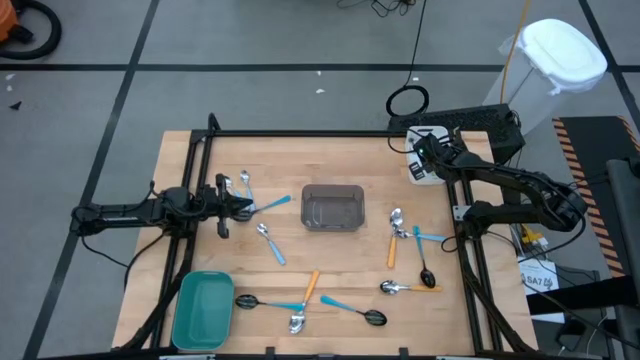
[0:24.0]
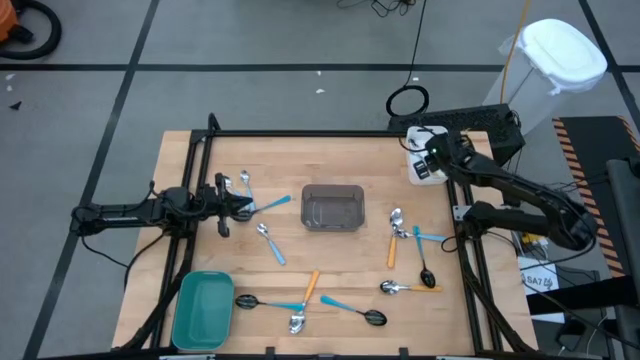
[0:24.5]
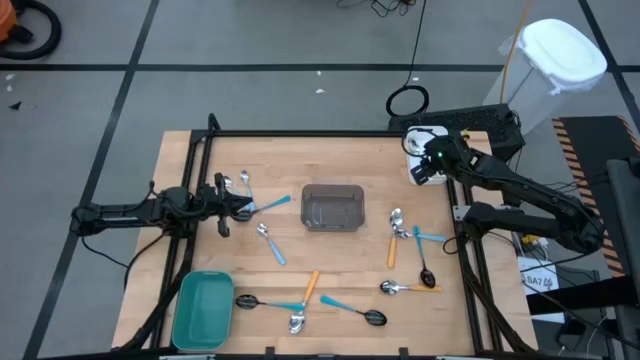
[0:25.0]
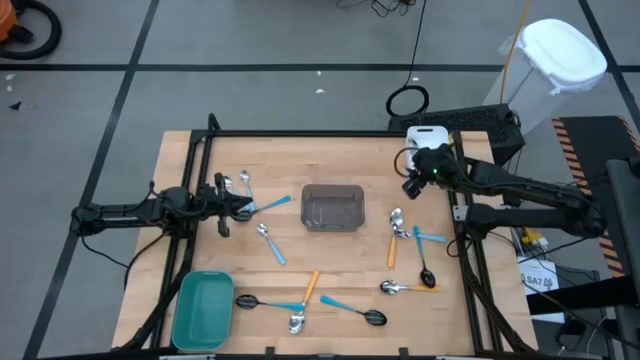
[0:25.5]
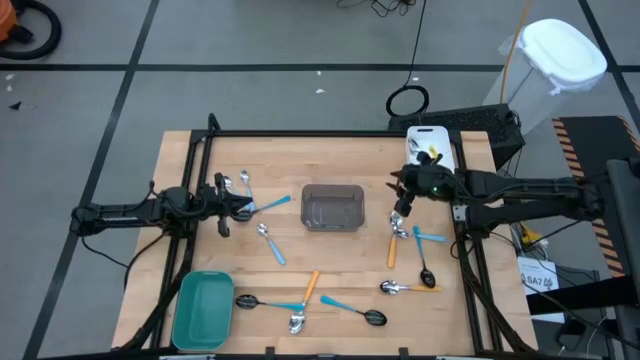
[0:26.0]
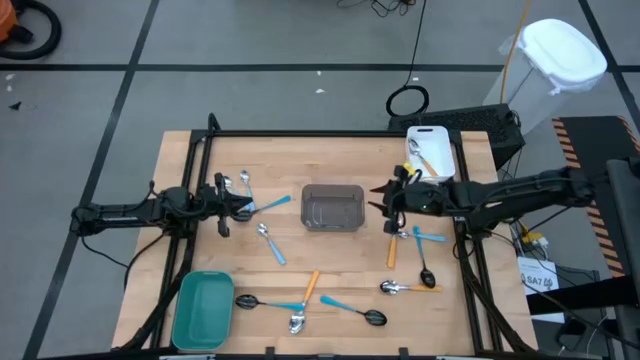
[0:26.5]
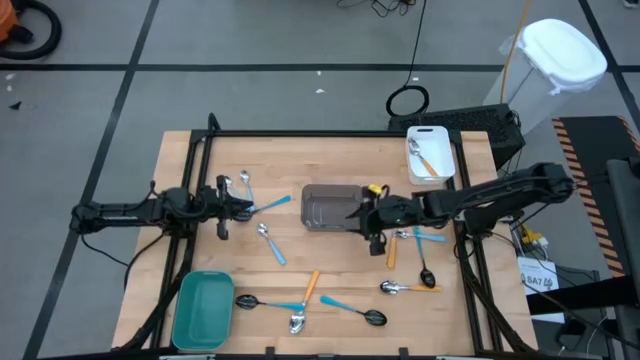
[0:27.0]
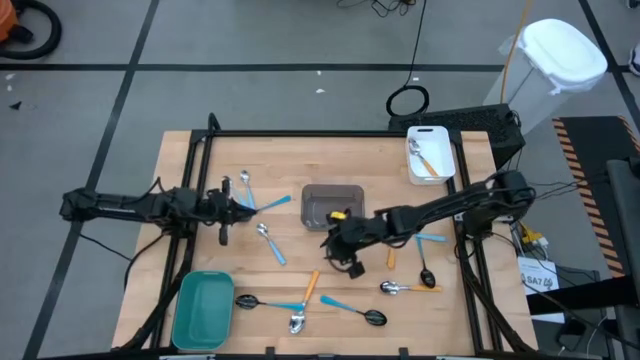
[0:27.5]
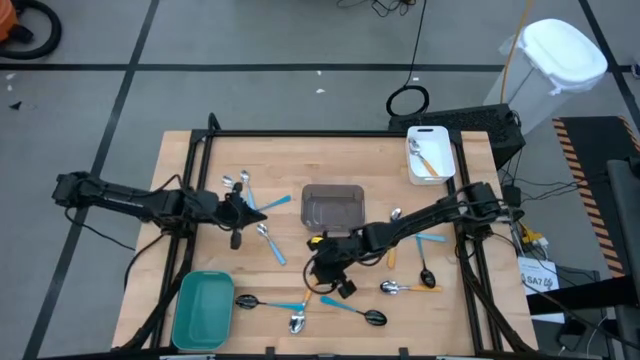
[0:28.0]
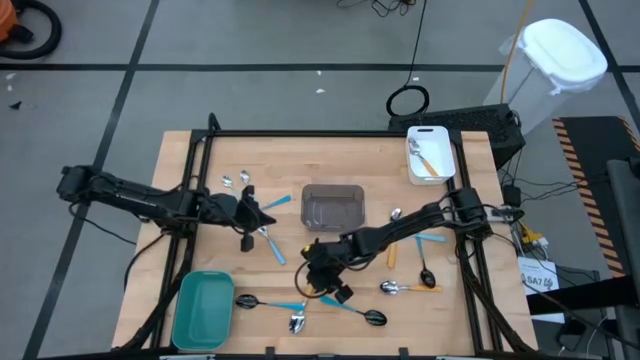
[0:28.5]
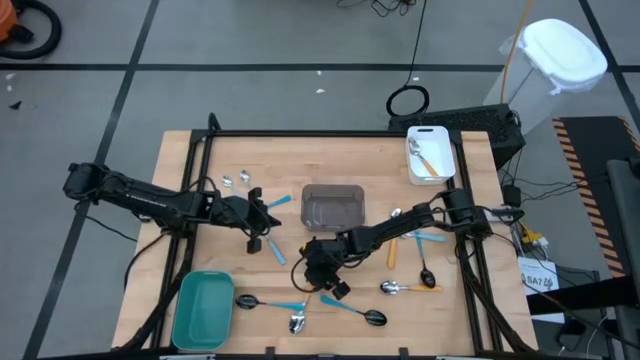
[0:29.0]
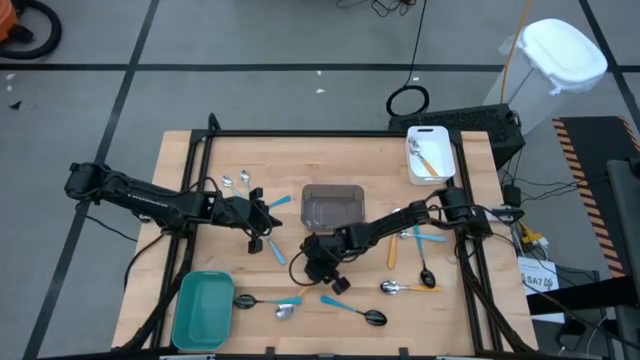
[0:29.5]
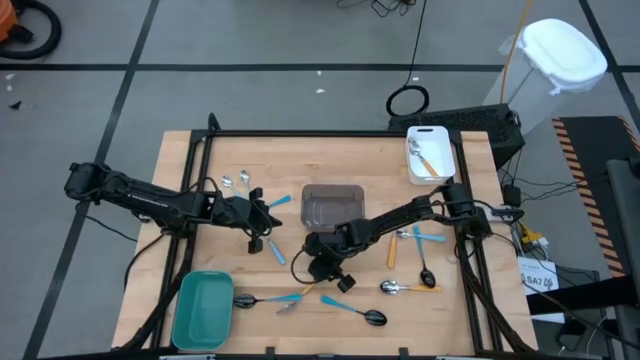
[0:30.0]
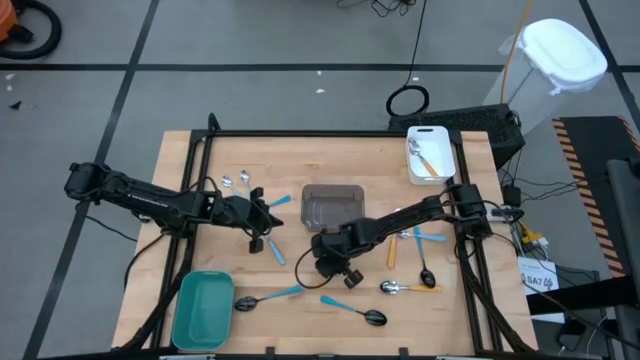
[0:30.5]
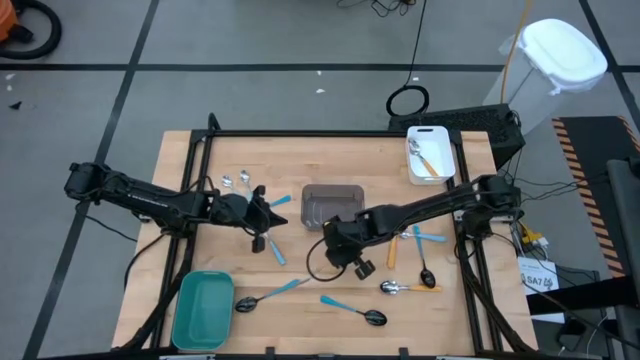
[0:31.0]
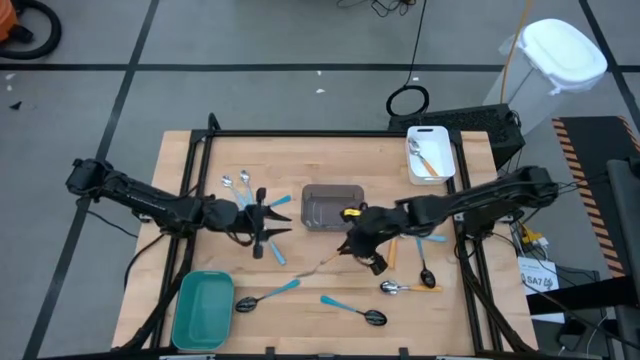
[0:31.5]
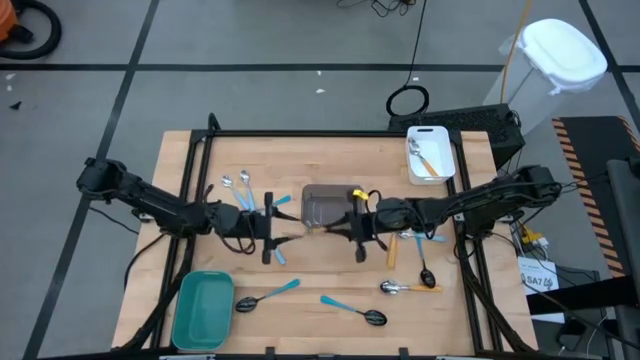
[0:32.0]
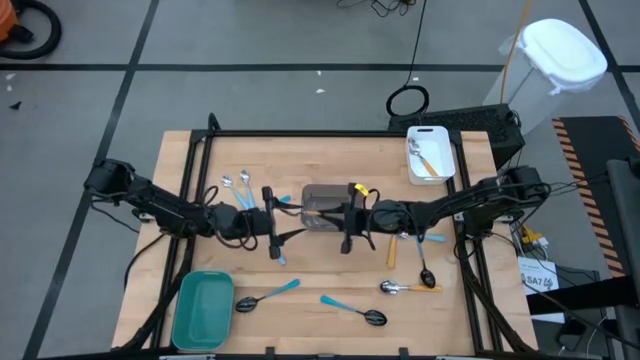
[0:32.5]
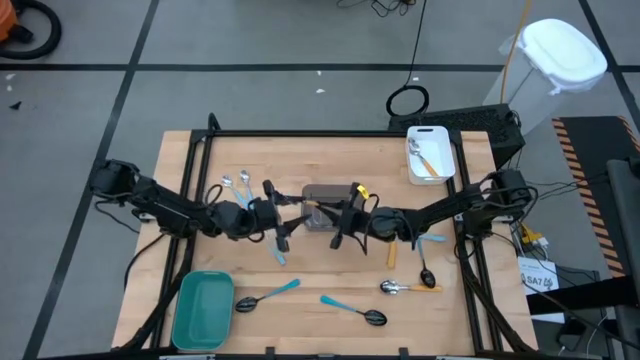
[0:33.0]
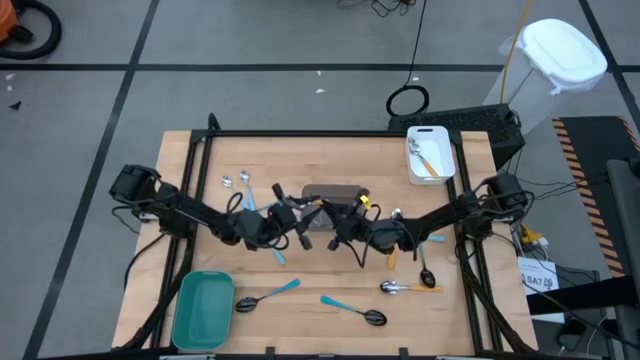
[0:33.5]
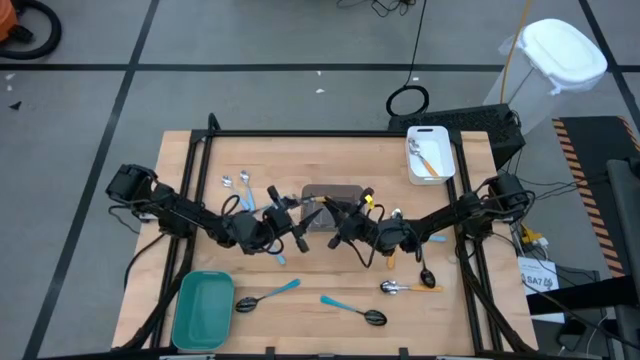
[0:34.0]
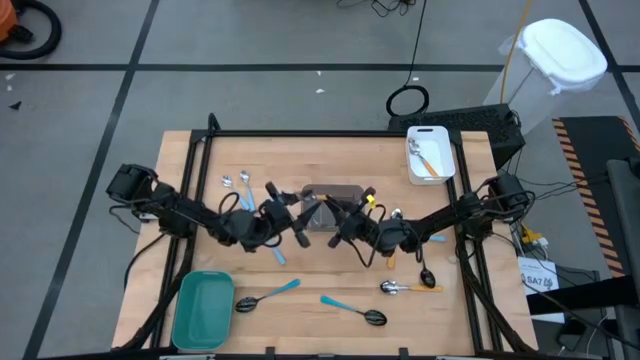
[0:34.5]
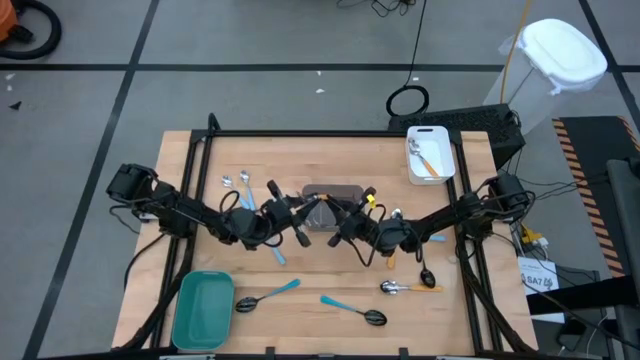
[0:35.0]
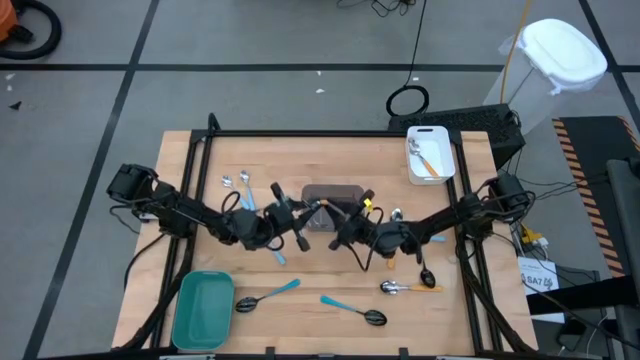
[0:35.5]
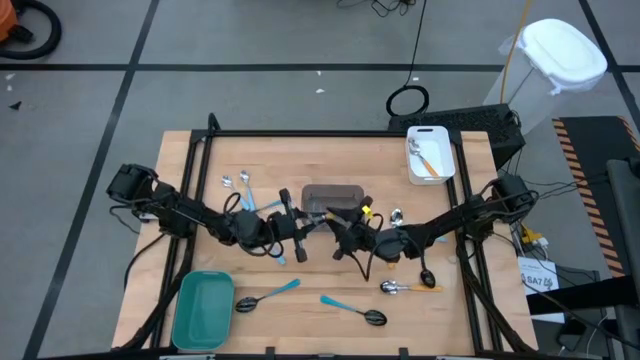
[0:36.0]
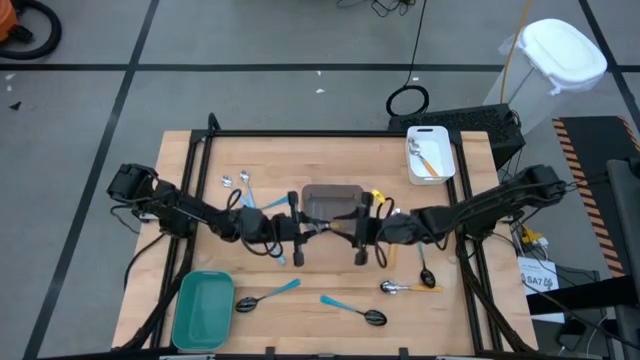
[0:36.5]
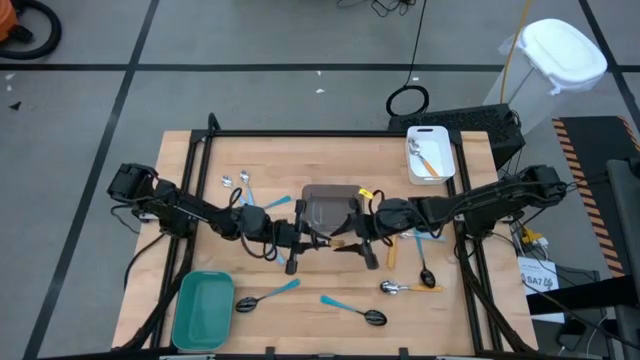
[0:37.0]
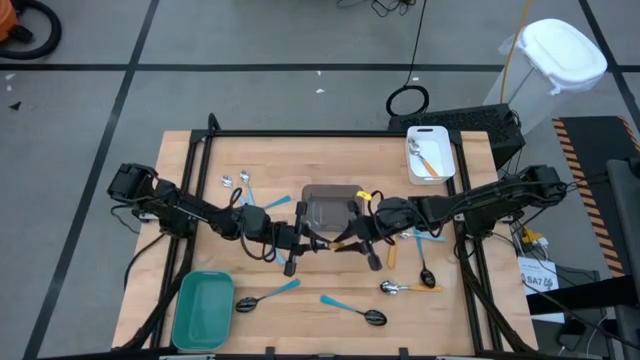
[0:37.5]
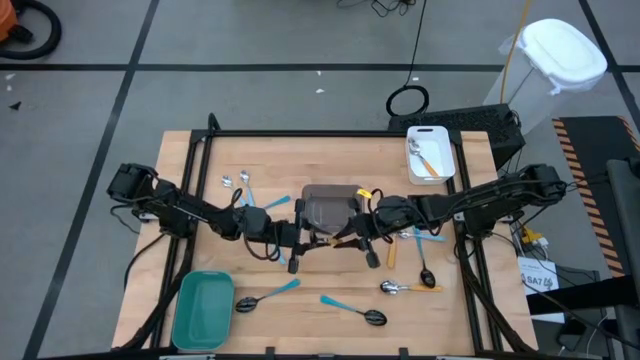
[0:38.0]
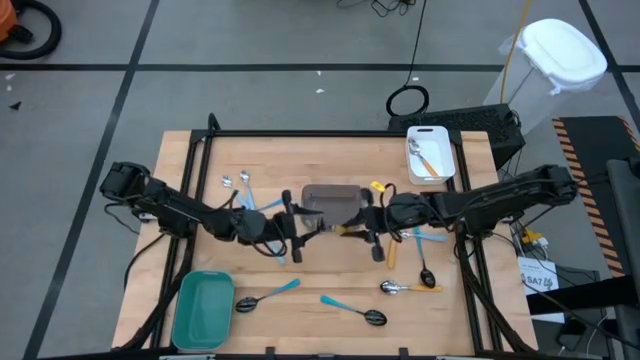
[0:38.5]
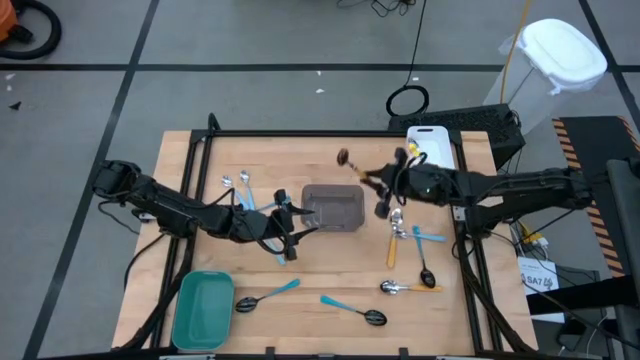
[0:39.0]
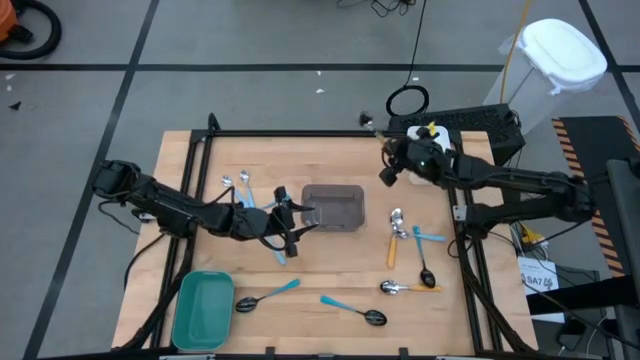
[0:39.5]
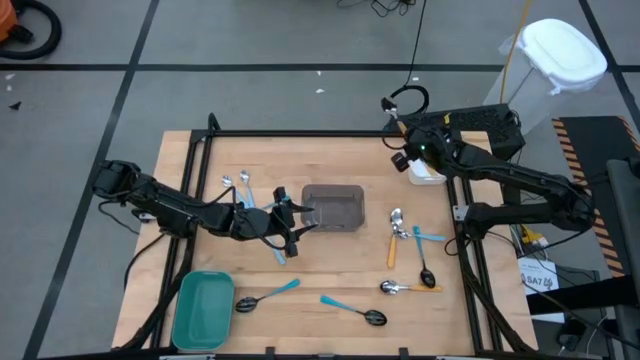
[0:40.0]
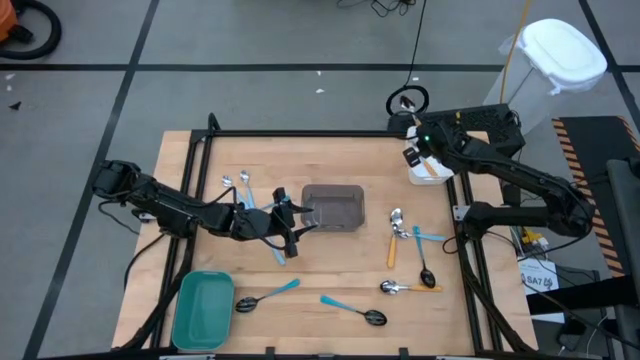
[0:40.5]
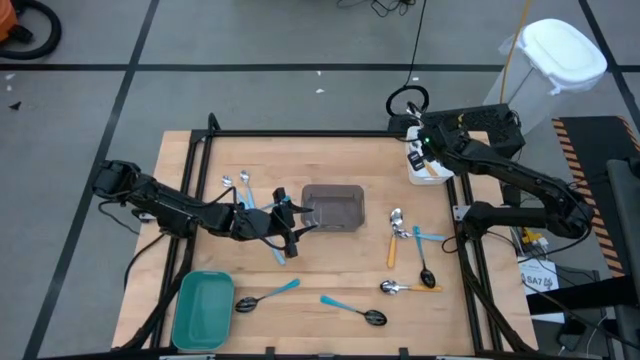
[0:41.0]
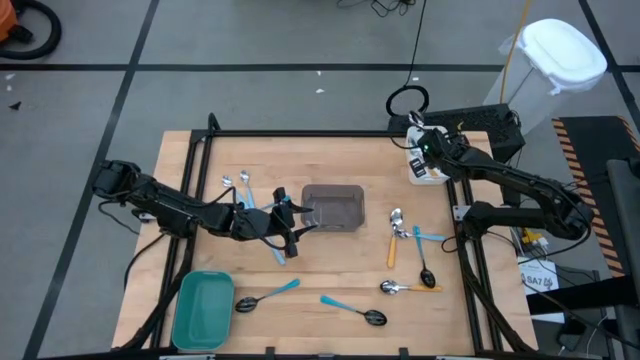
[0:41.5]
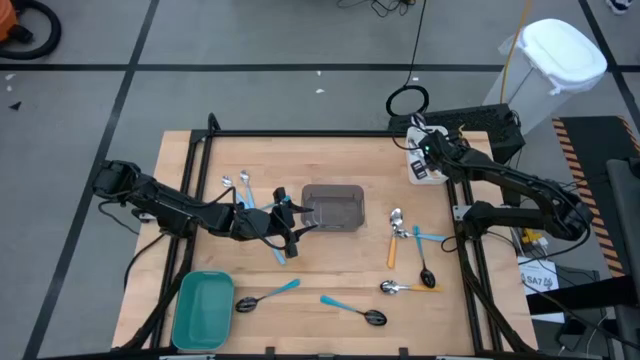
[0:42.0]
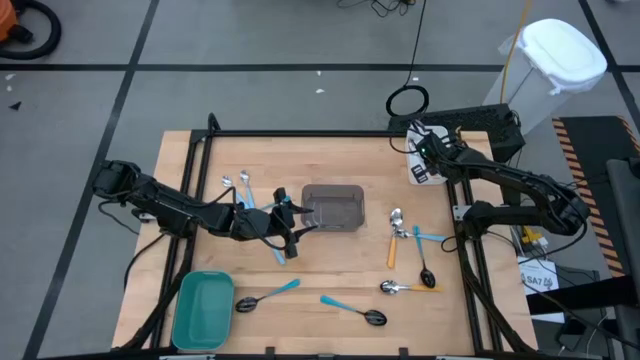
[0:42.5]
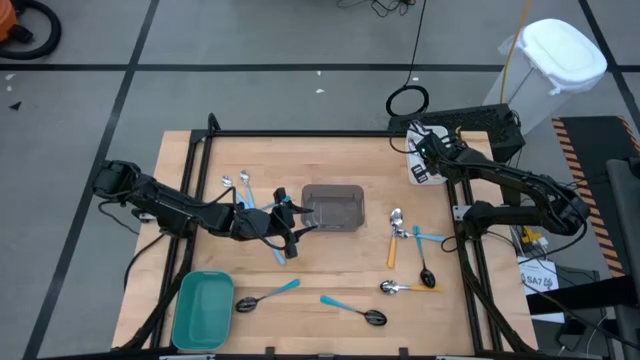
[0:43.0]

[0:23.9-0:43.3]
Task: Sort silverware by color (type)
Put the bottom left yellow spoon into the white bin
